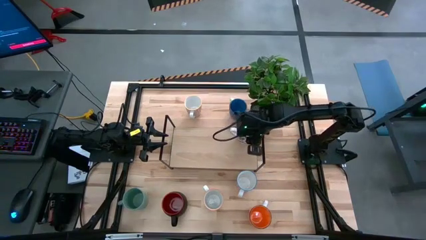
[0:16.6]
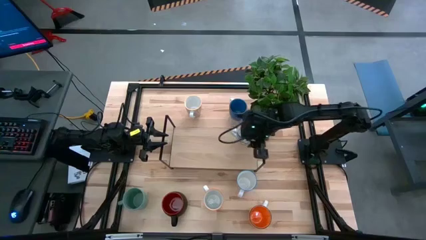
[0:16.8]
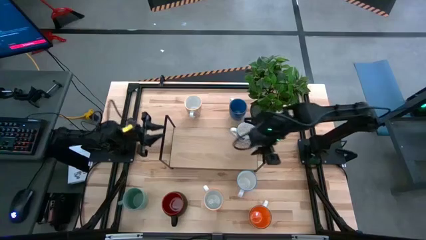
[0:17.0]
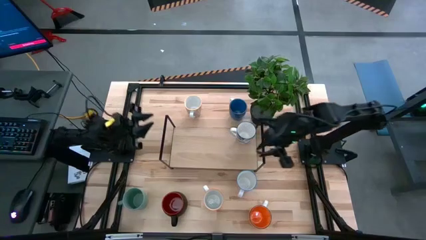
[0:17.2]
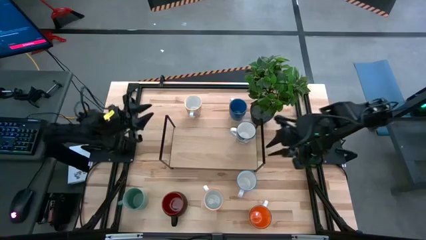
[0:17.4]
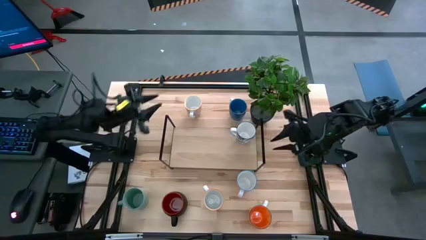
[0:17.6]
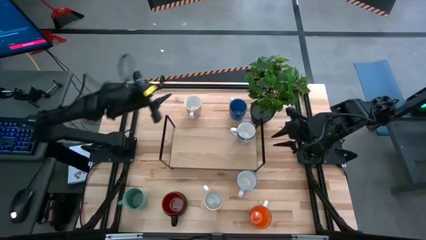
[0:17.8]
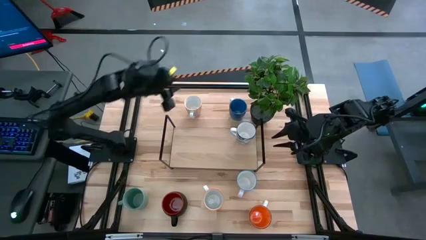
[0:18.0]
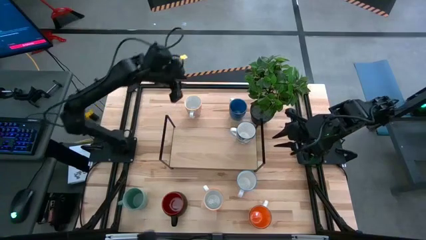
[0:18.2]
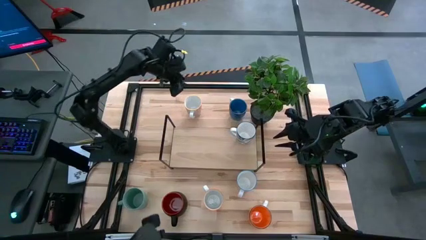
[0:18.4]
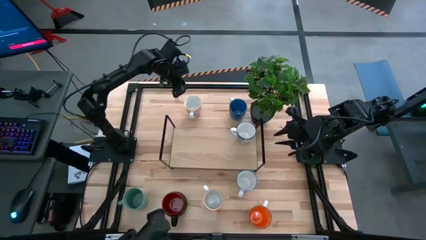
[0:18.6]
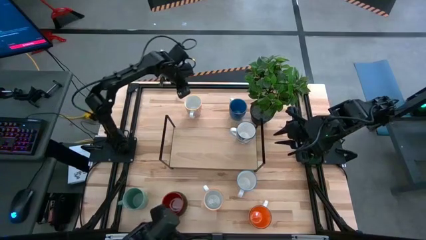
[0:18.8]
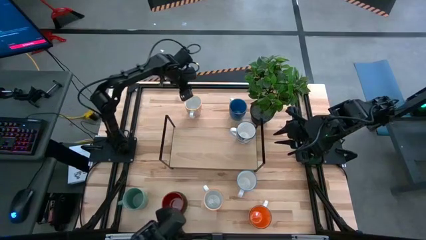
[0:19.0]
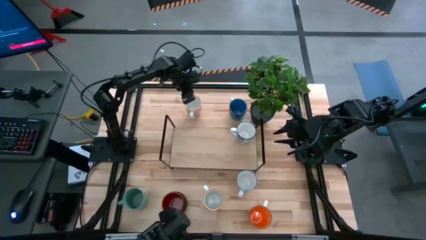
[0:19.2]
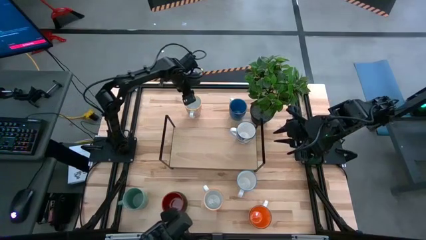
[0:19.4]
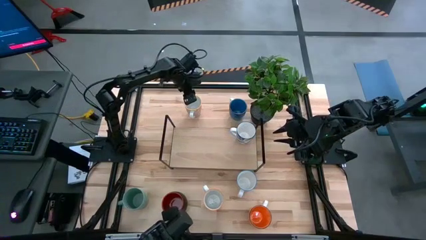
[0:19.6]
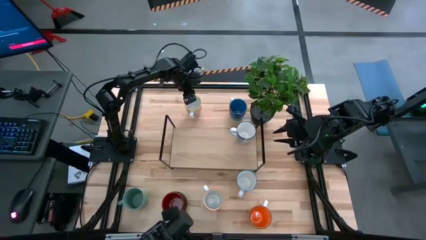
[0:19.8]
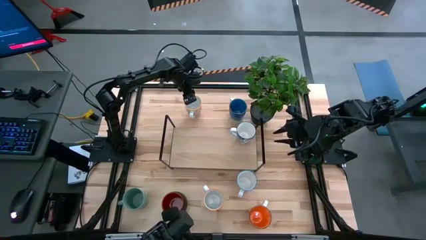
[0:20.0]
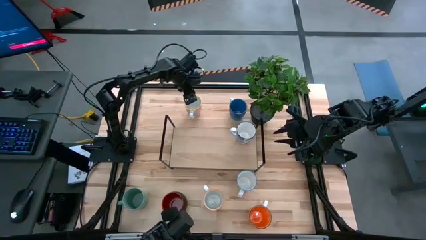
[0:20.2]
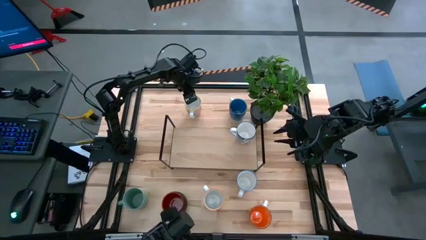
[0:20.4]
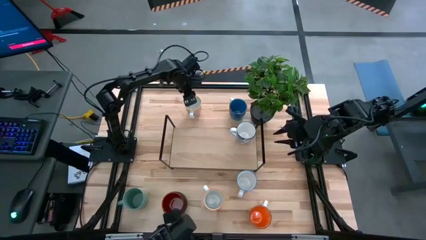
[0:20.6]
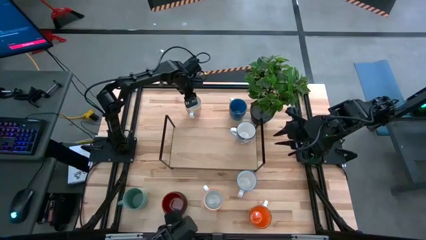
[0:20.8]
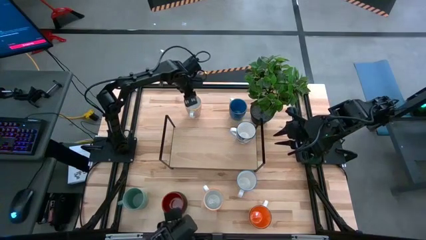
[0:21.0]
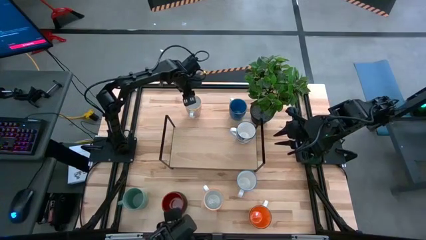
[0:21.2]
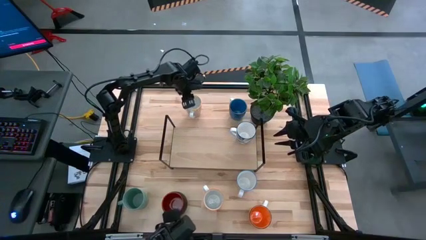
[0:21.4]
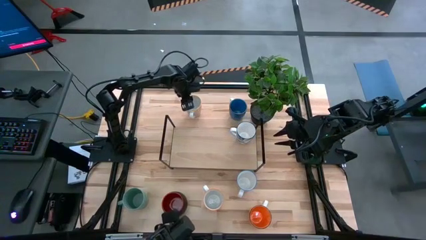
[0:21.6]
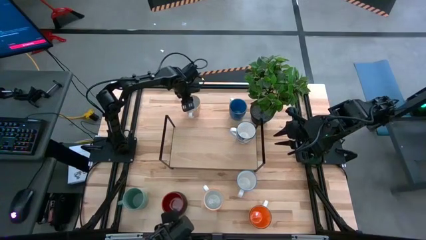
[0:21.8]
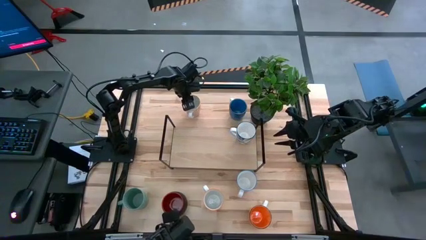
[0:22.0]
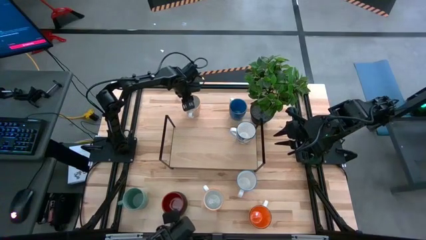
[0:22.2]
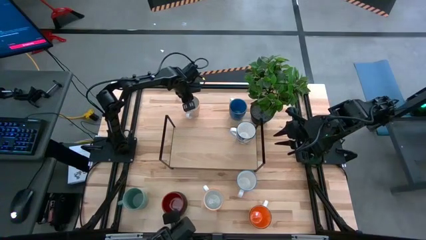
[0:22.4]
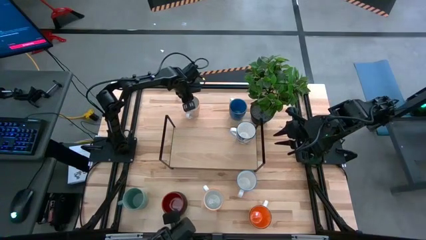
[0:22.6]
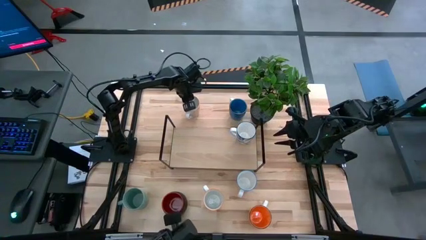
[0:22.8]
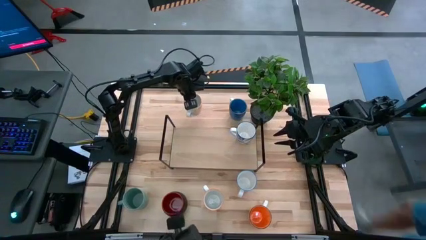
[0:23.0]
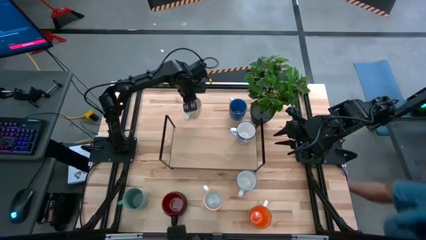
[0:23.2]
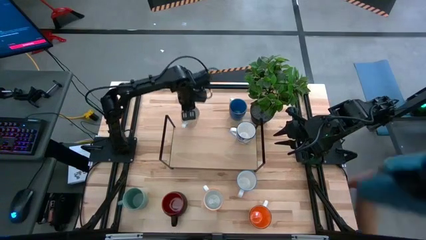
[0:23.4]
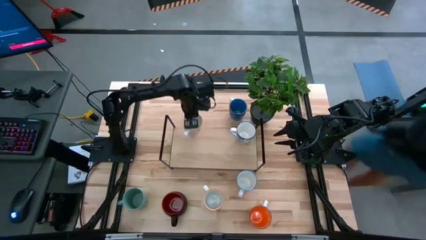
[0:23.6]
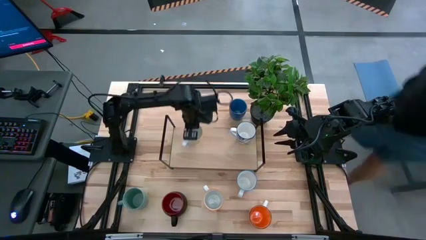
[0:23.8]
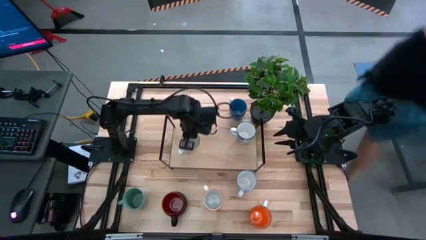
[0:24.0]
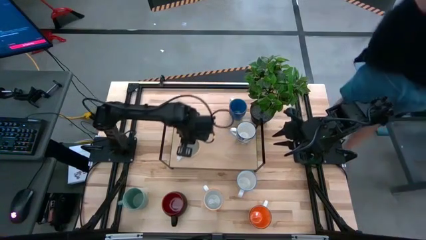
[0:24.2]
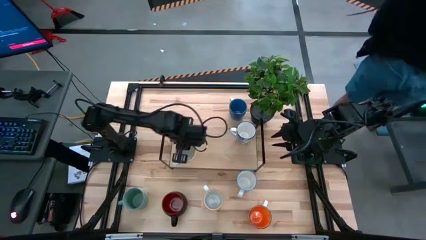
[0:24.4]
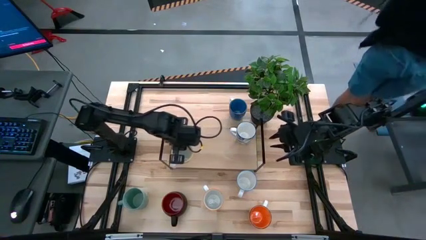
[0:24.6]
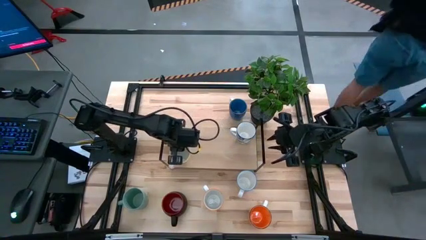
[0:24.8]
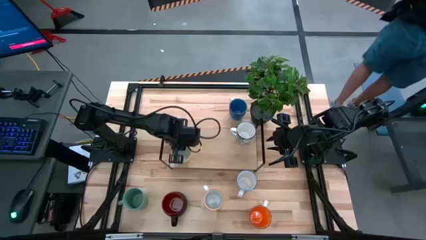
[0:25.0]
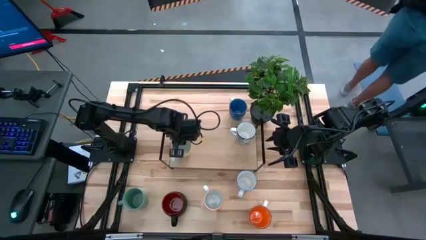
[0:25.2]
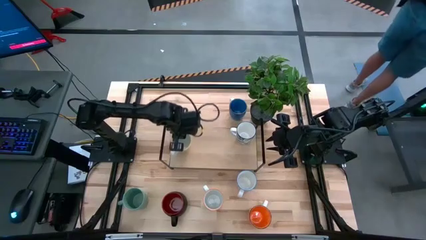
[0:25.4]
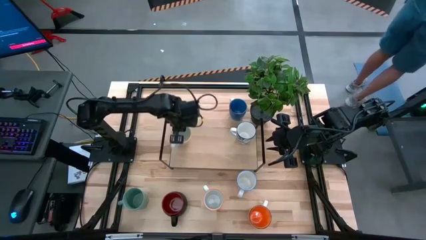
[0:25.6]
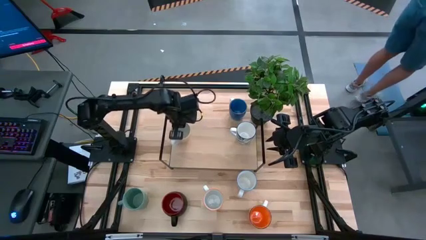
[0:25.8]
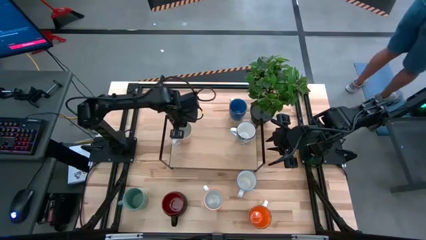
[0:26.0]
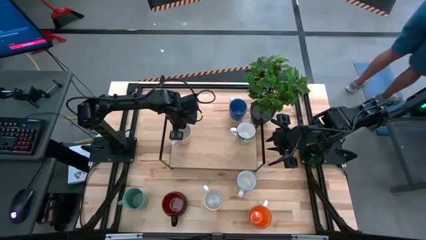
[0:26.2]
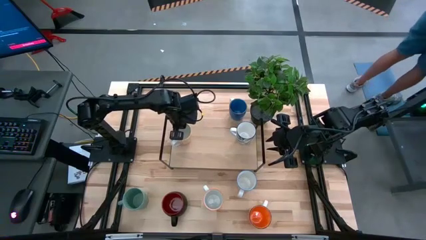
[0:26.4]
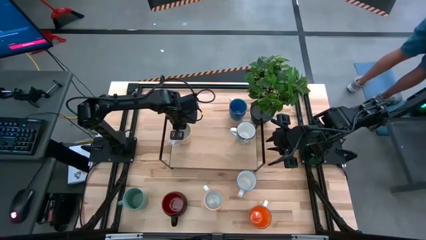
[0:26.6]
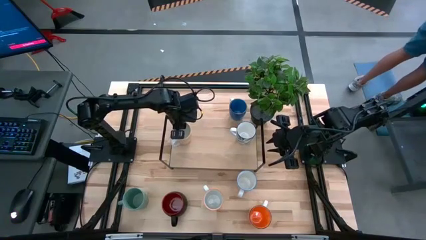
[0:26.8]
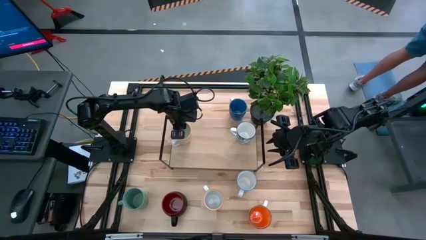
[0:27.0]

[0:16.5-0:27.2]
Task: Place coffee mugs
Put the white and orange patterned mug on the shelf
